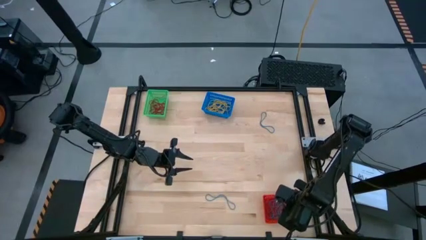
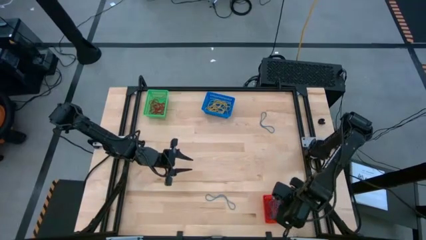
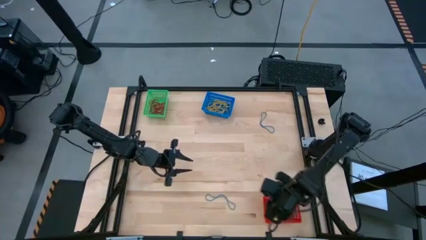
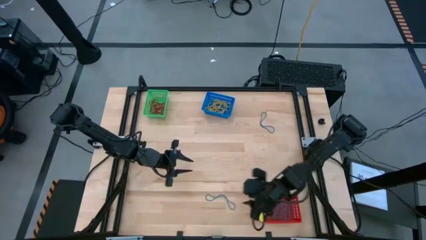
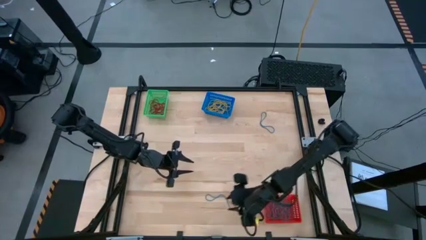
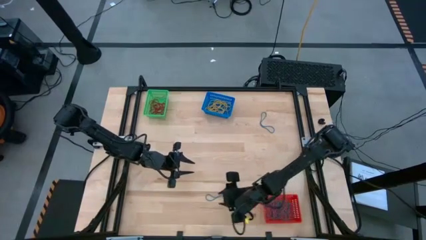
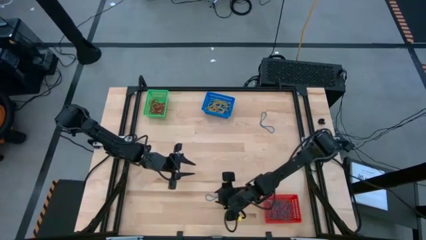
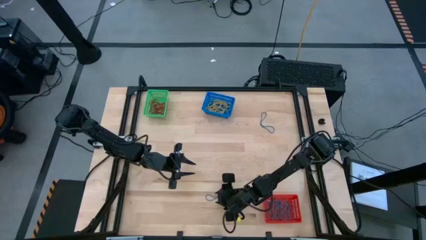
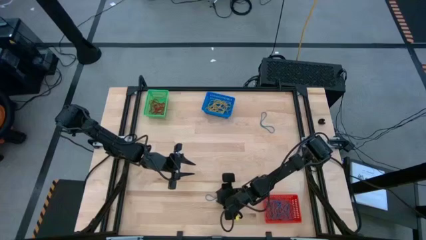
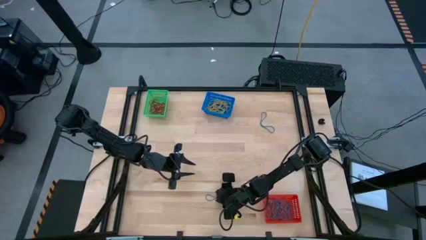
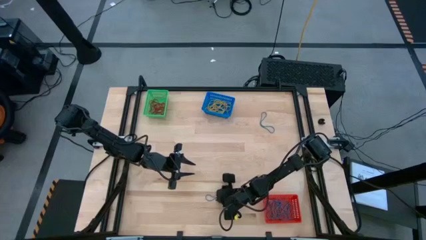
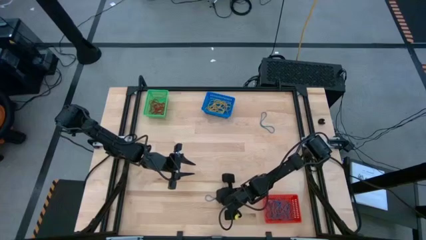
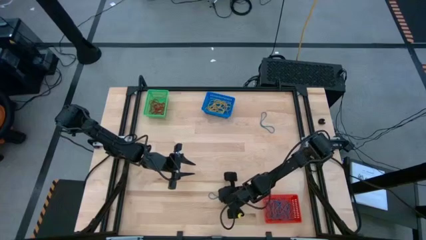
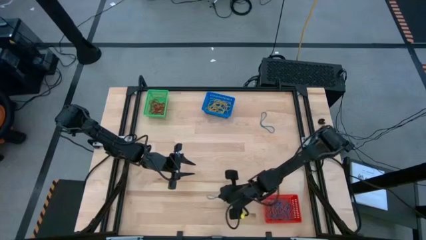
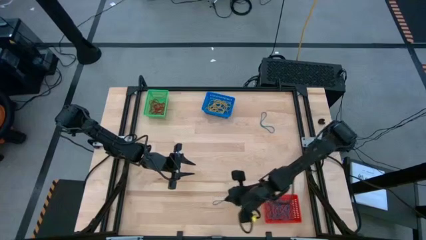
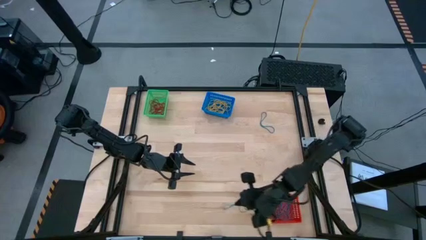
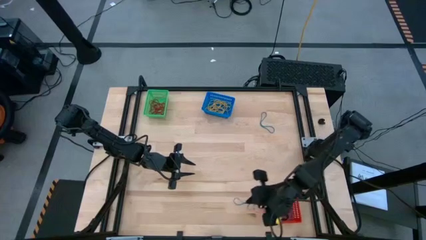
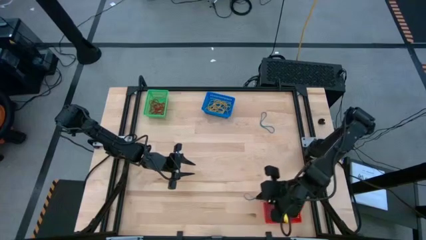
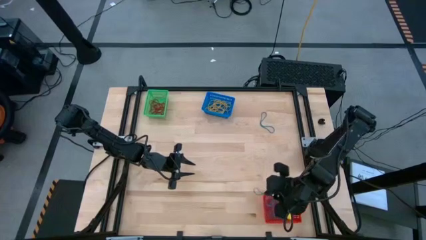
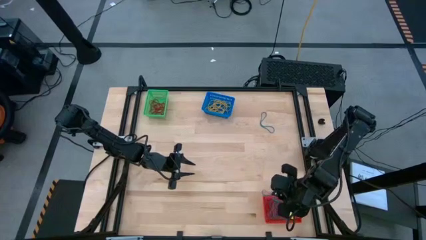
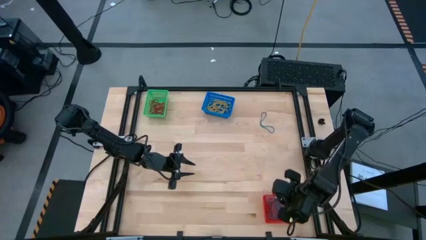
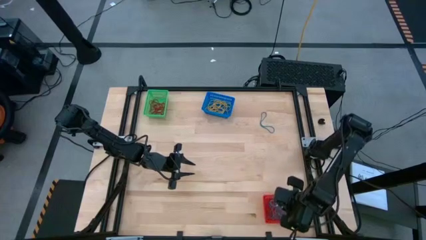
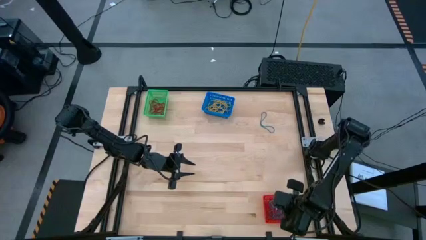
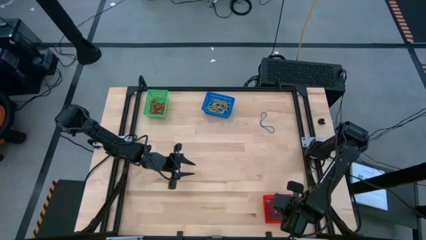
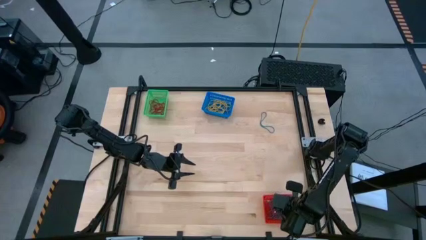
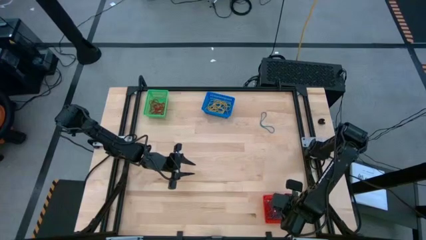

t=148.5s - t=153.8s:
Task: Sort rubber bands into baskets
Put the blue rubber band into the red bin

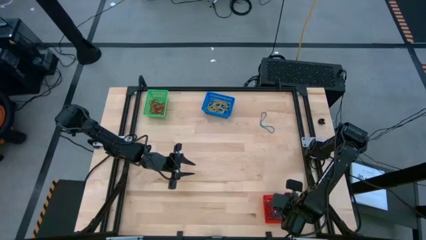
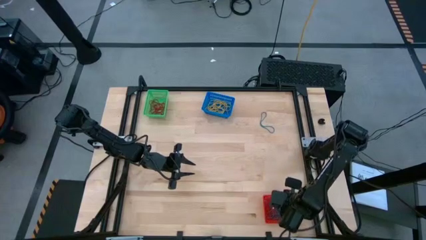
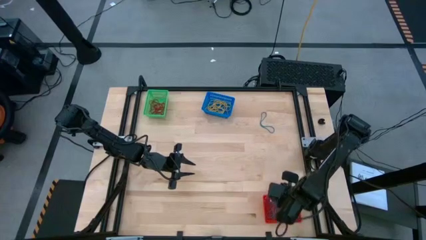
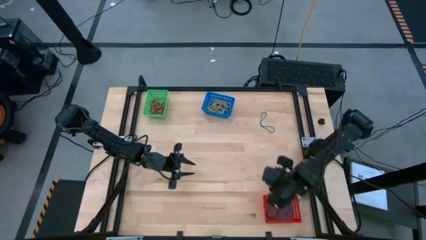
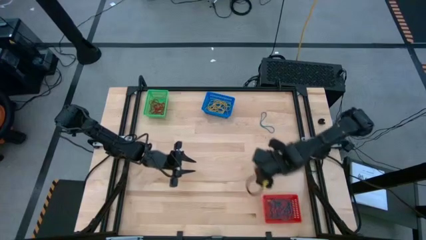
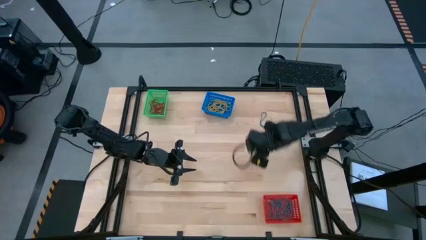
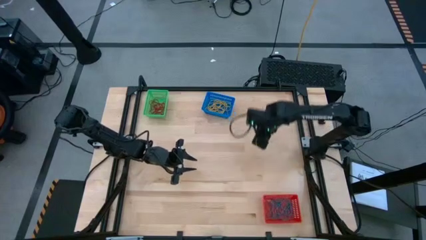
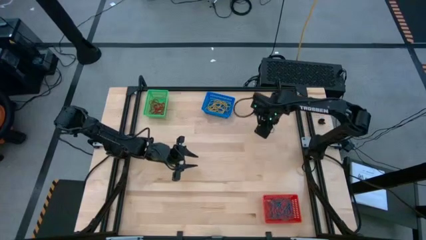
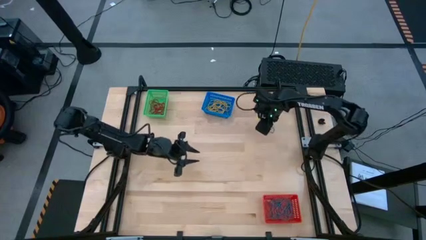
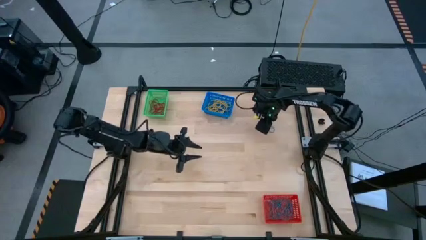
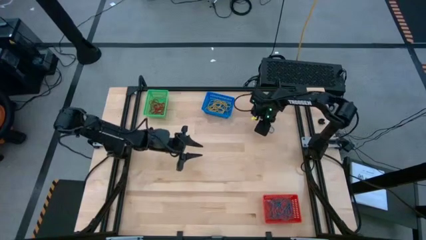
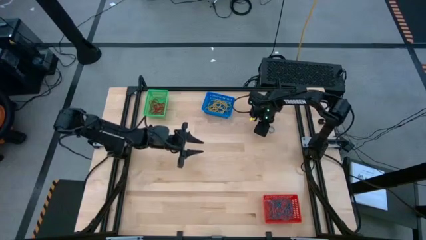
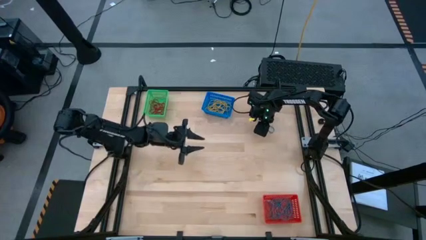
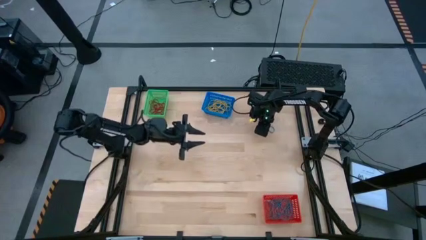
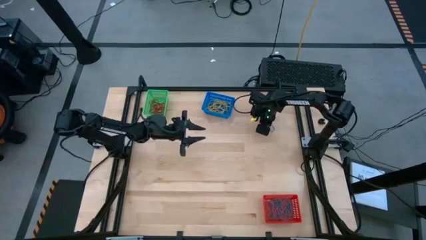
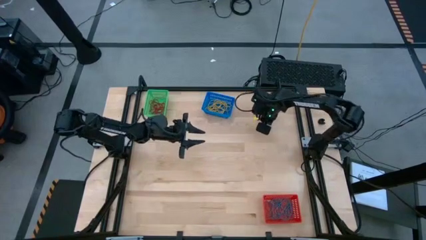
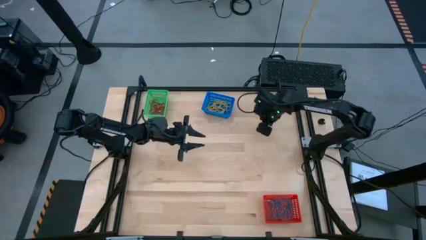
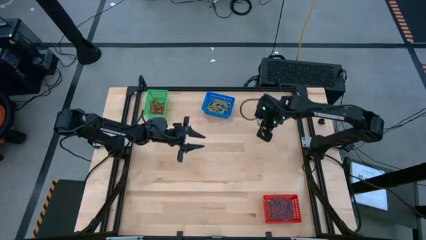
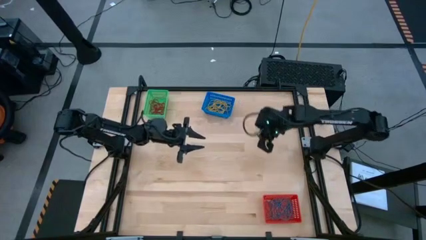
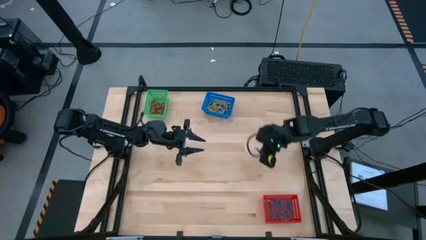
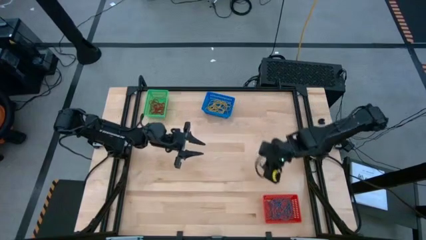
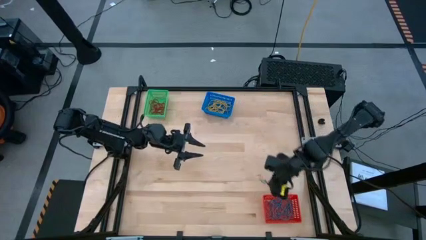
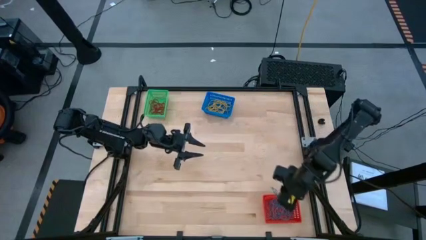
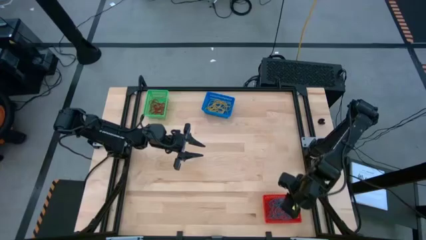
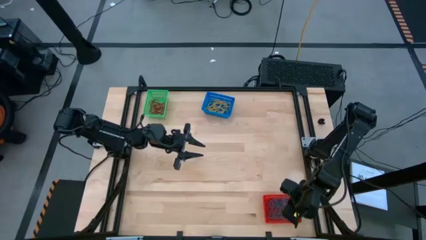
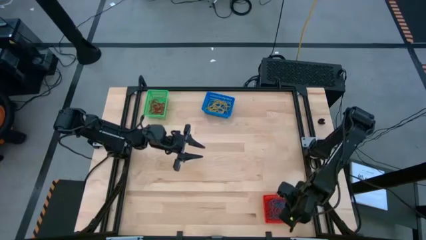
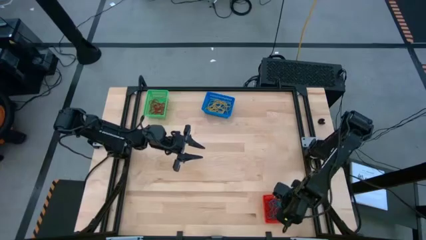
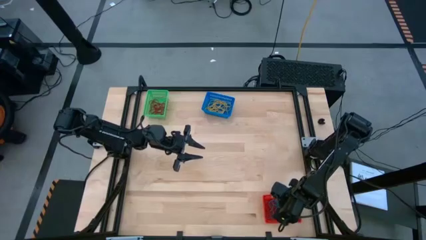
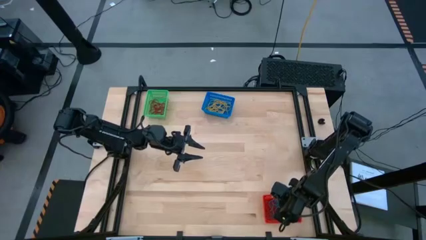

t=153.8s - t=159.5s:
Put the blue rubber band into the red bin

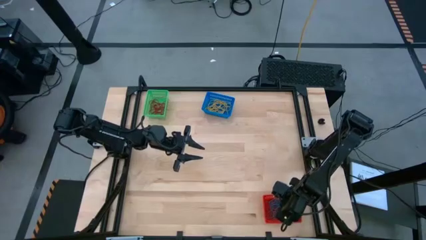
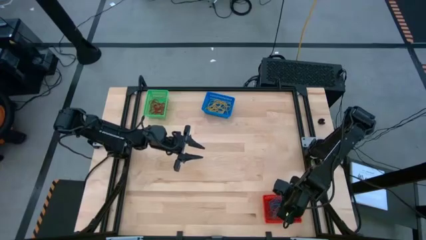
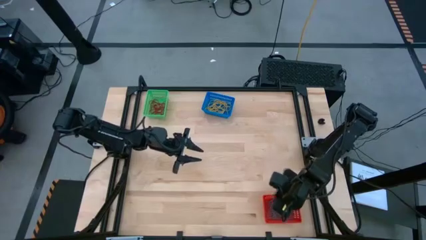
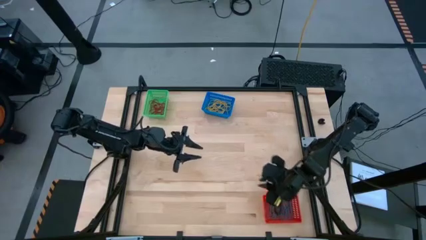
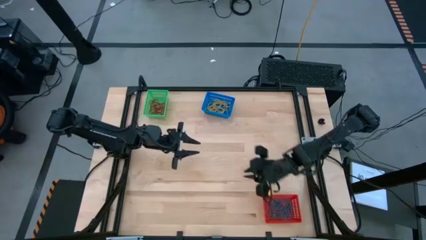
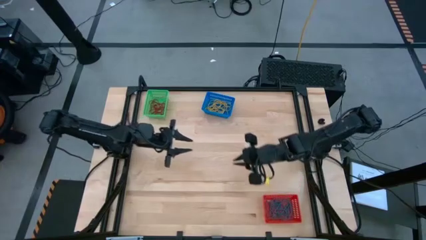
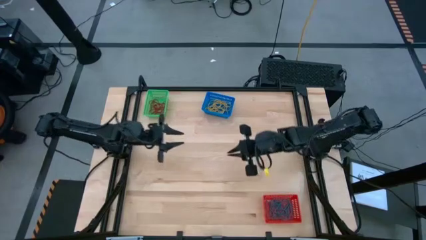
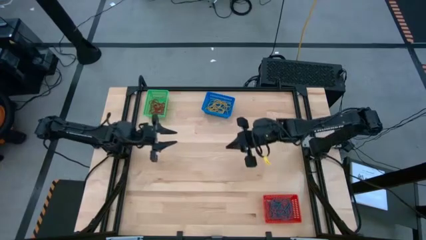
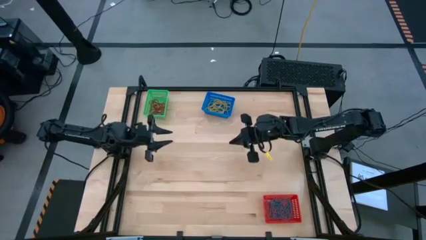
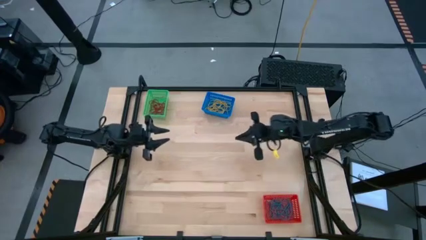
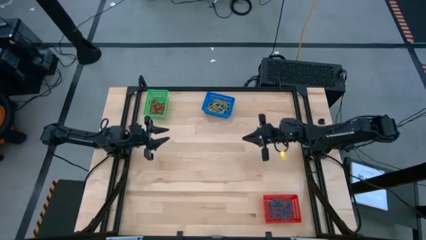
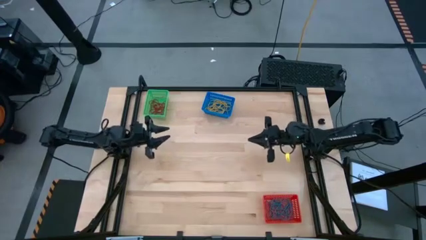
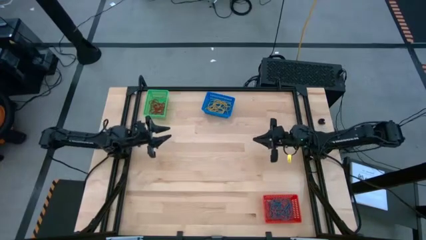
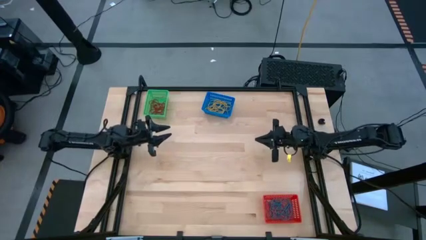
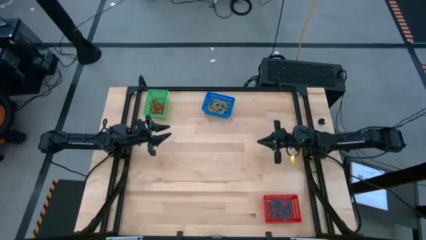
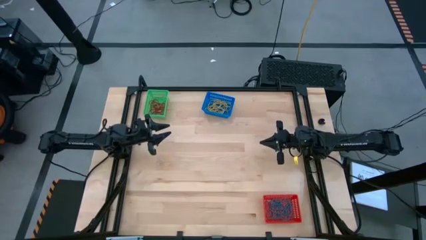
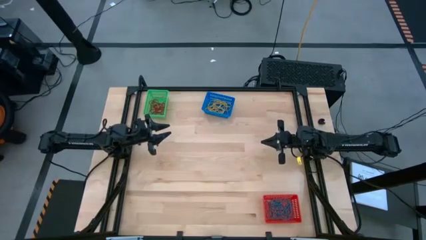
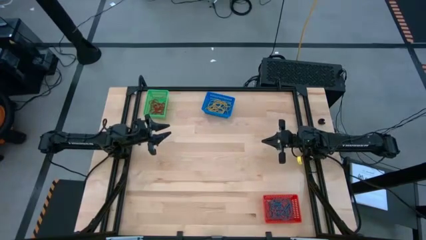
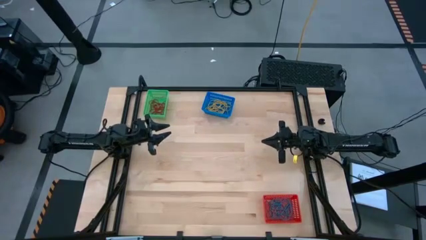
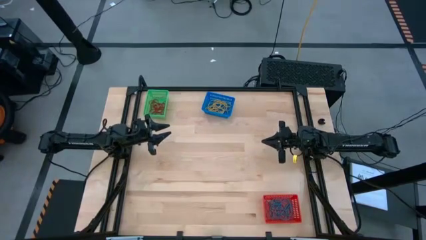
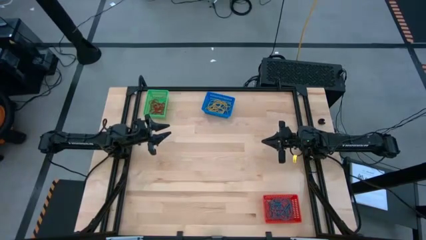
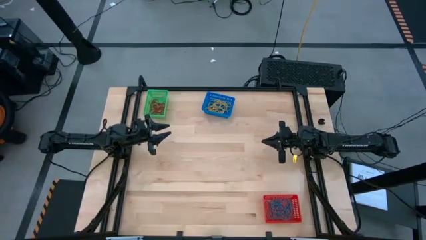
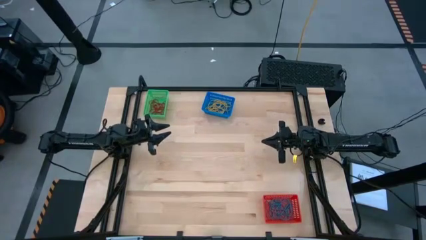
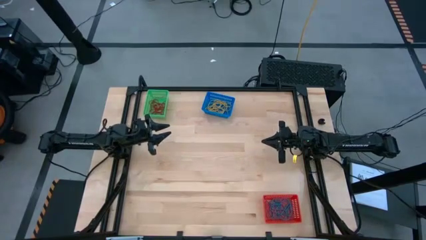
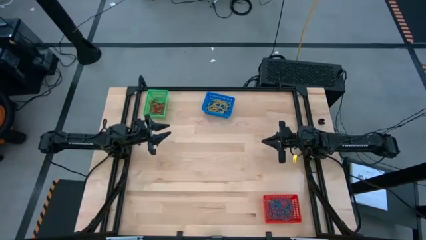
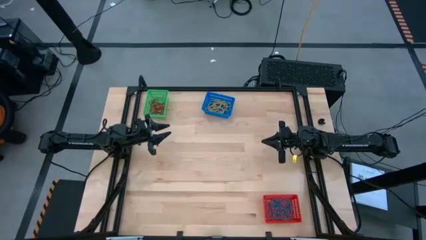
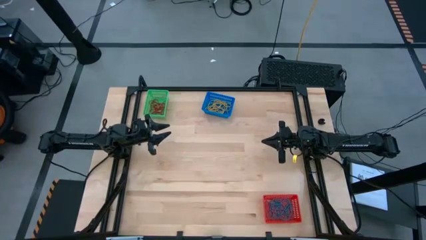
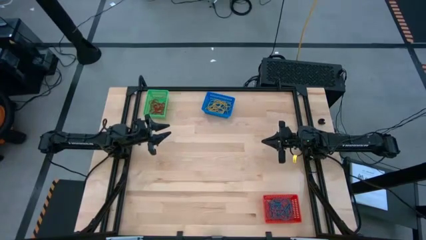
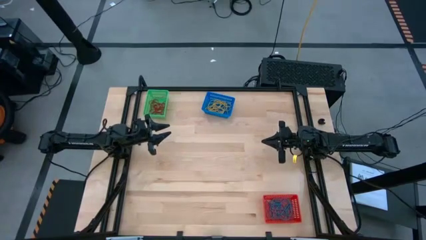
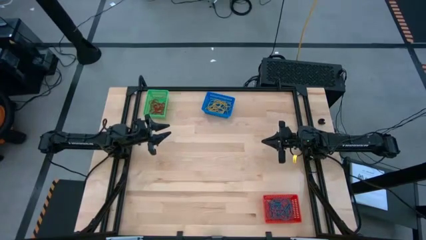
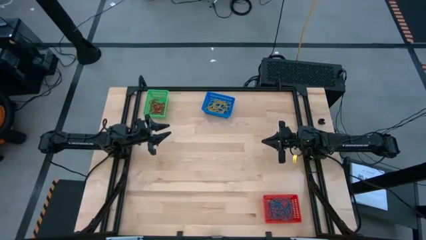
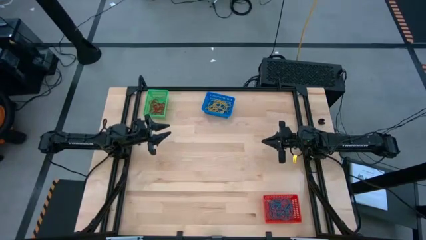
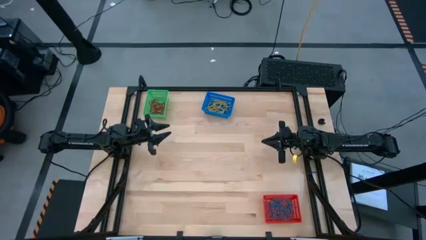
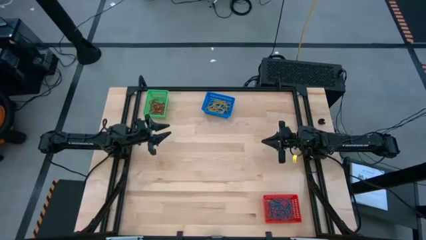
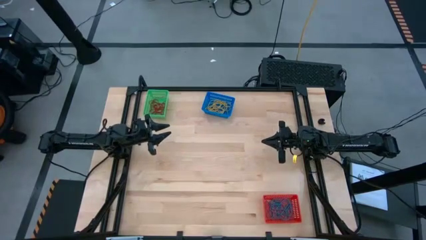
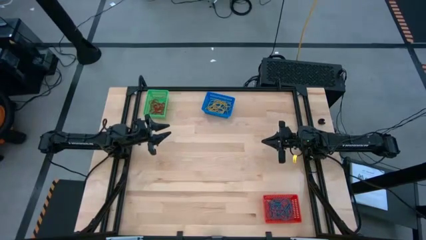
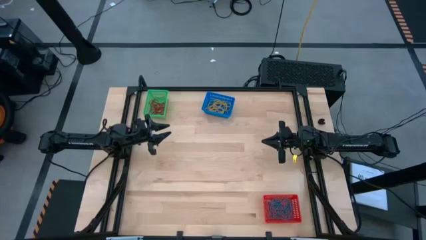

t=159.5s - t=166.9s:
Return to Home Position
